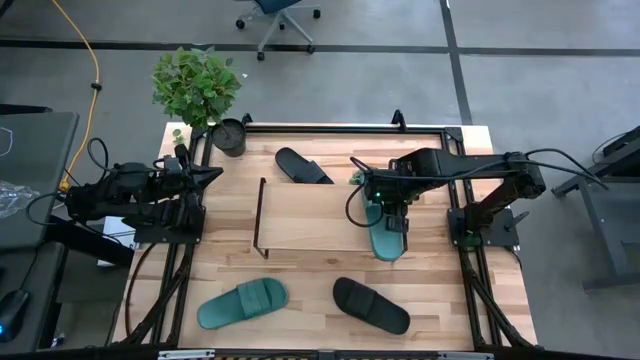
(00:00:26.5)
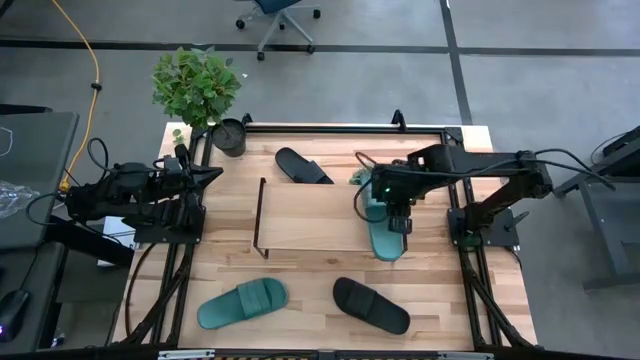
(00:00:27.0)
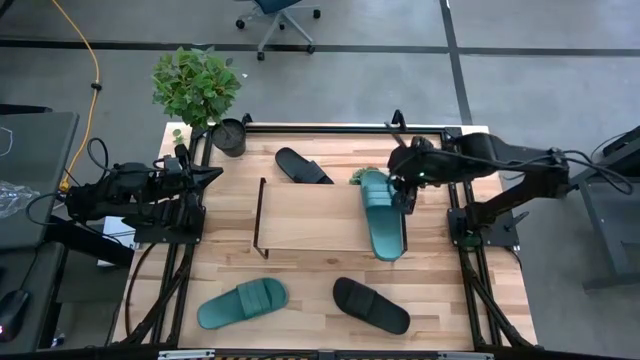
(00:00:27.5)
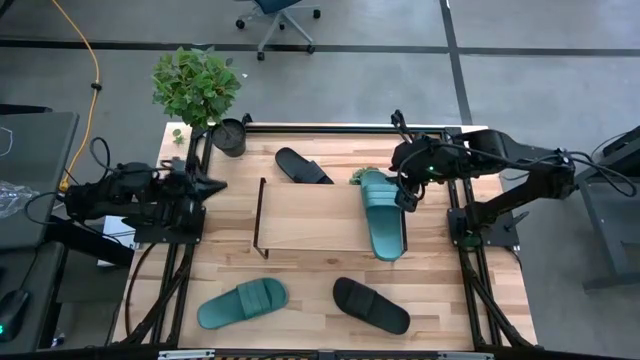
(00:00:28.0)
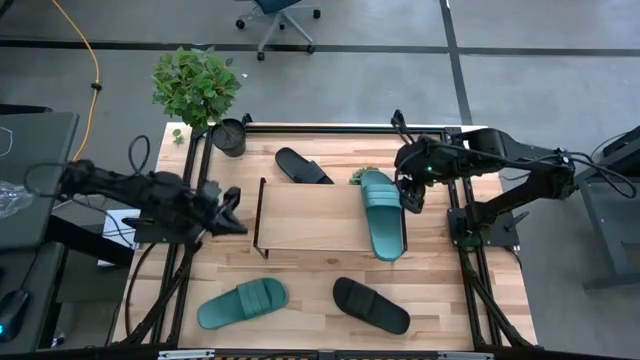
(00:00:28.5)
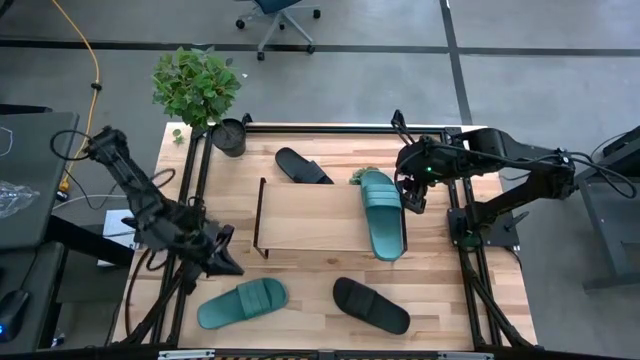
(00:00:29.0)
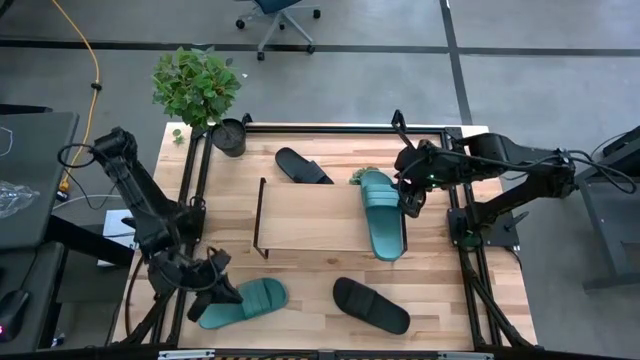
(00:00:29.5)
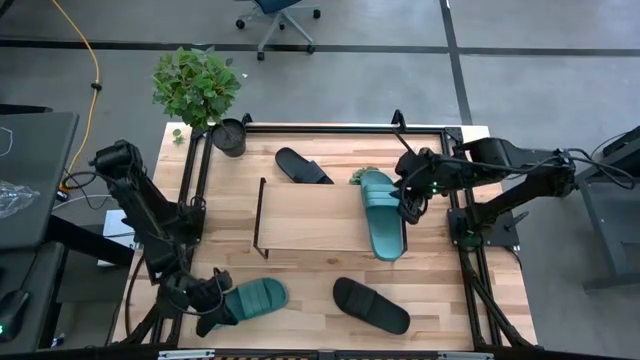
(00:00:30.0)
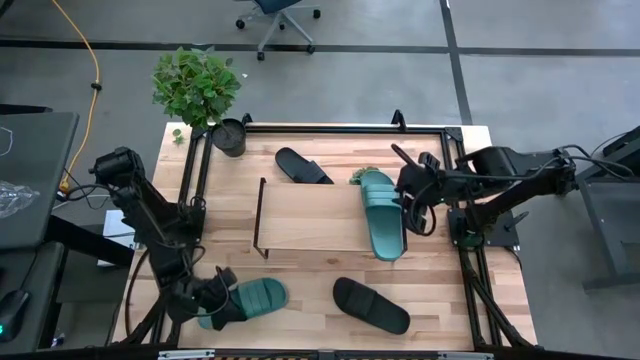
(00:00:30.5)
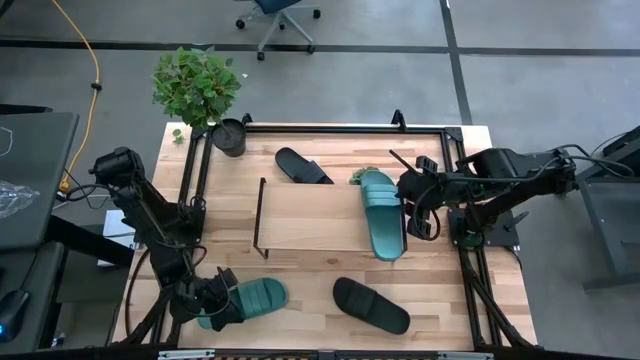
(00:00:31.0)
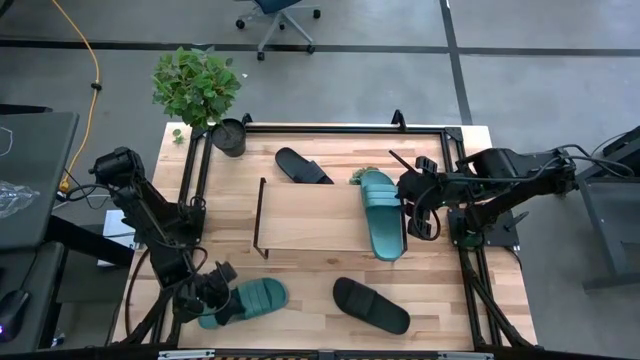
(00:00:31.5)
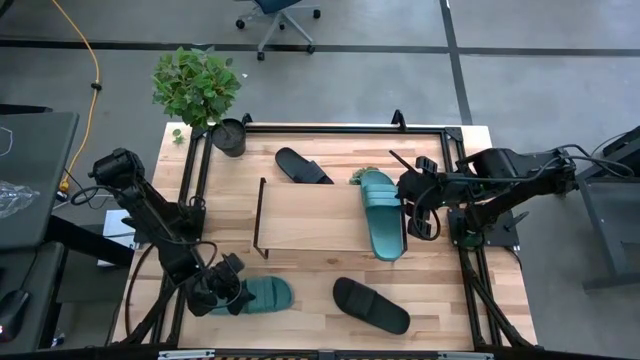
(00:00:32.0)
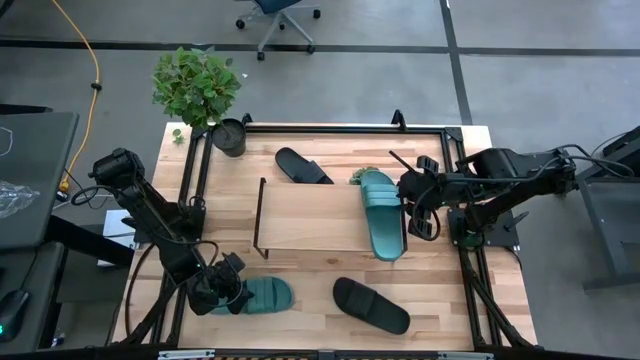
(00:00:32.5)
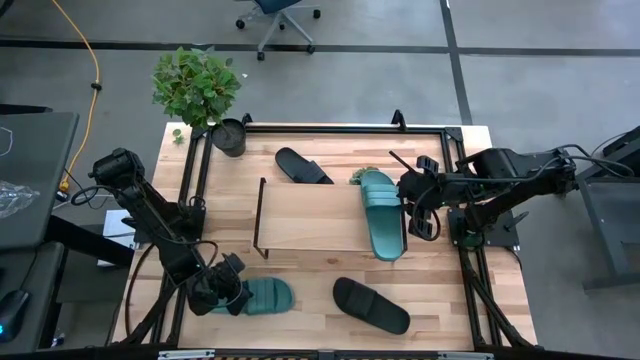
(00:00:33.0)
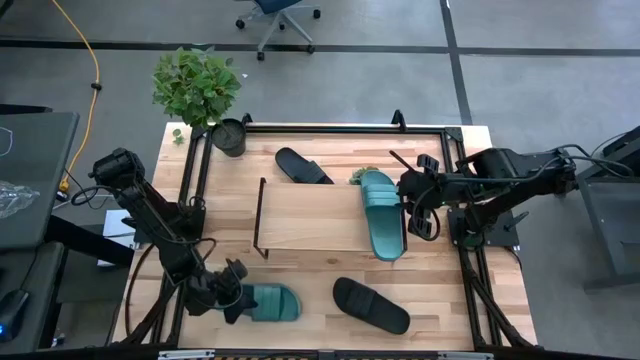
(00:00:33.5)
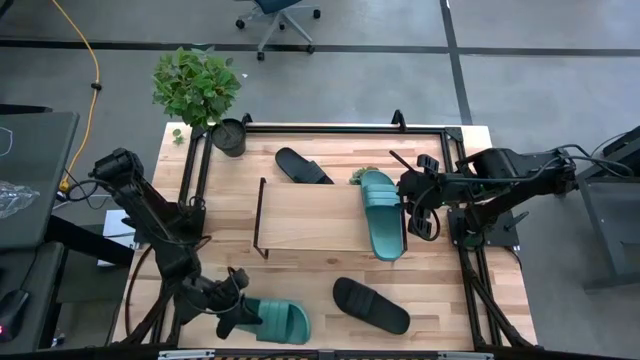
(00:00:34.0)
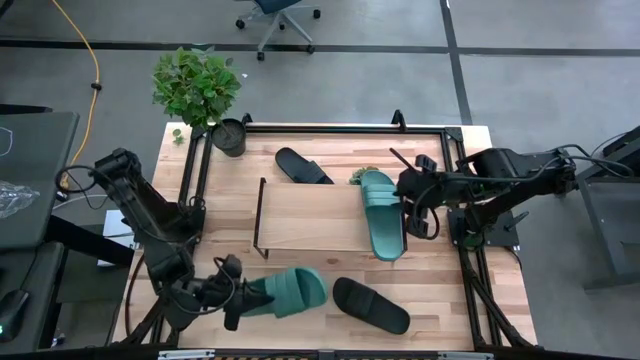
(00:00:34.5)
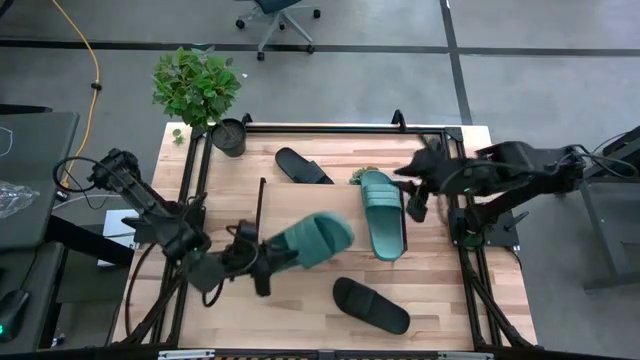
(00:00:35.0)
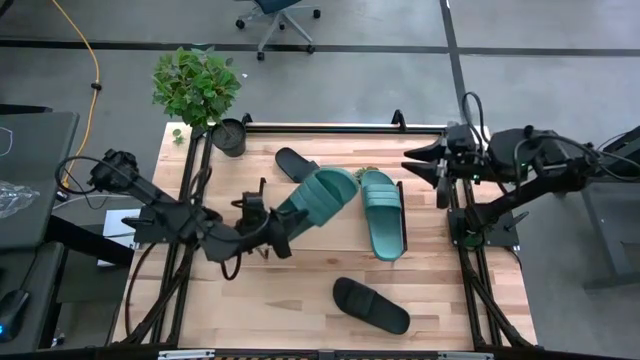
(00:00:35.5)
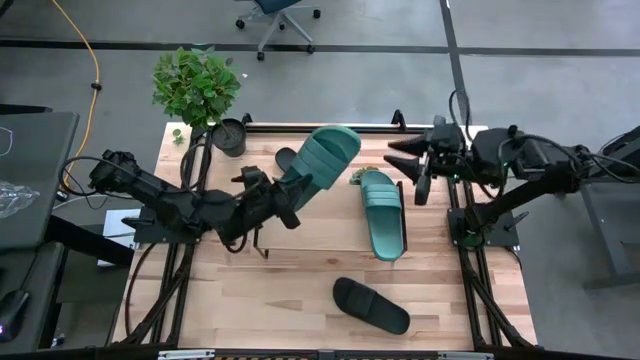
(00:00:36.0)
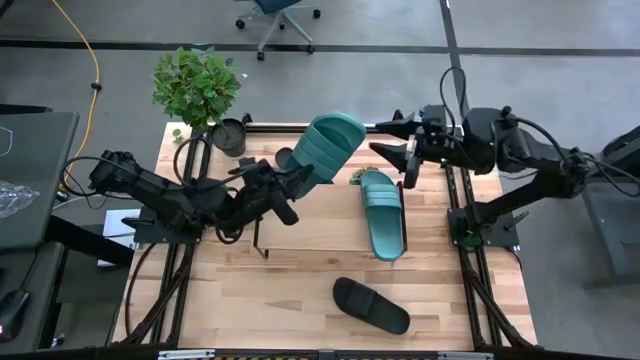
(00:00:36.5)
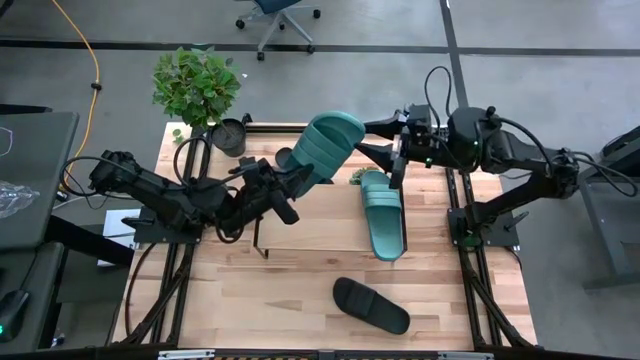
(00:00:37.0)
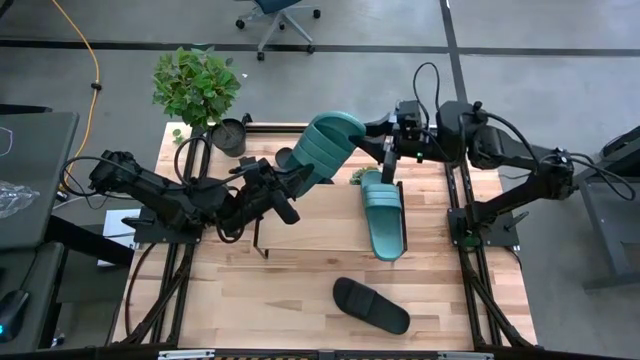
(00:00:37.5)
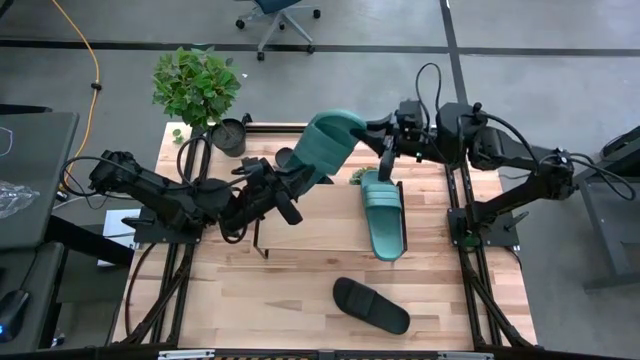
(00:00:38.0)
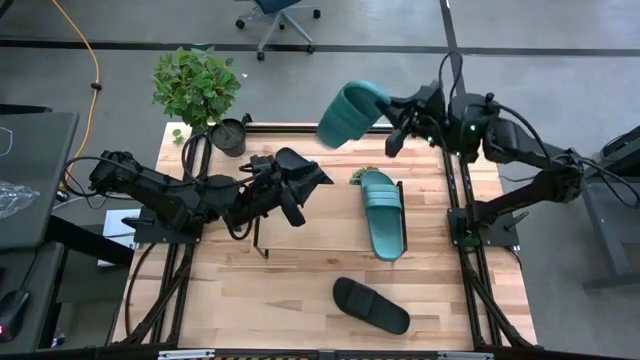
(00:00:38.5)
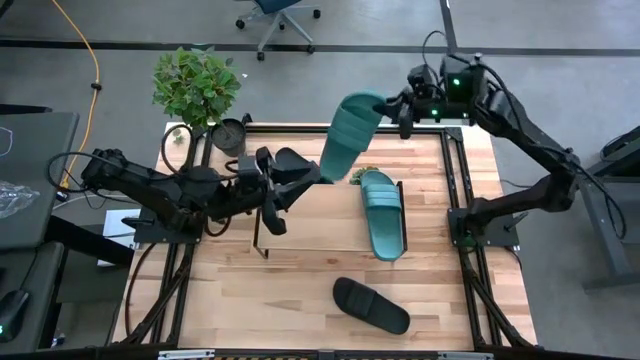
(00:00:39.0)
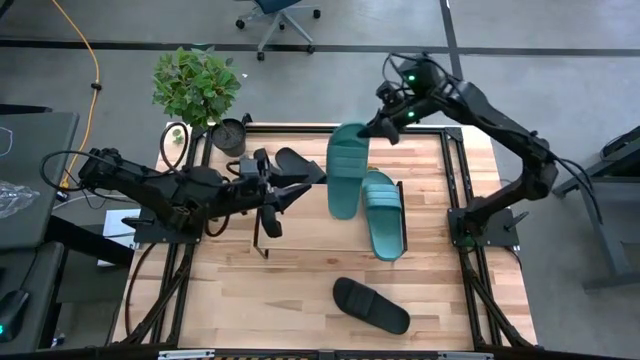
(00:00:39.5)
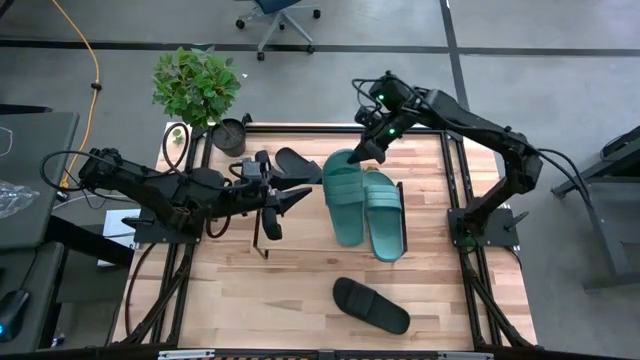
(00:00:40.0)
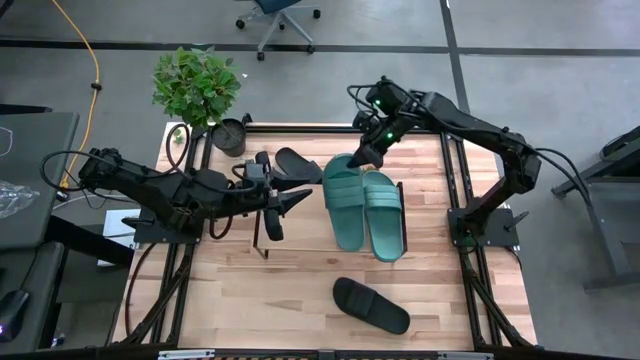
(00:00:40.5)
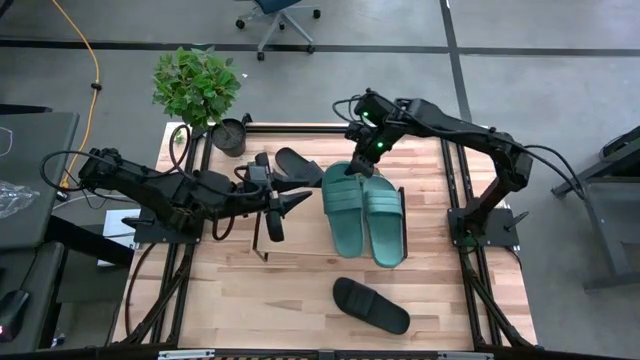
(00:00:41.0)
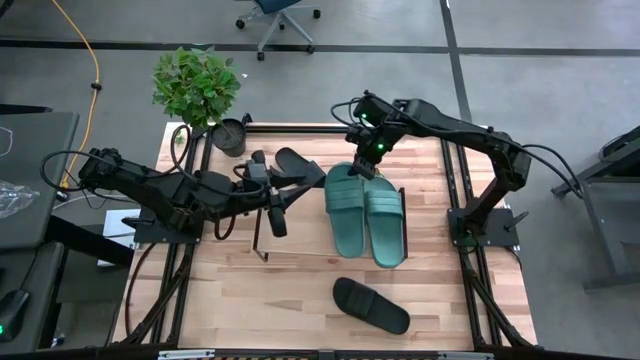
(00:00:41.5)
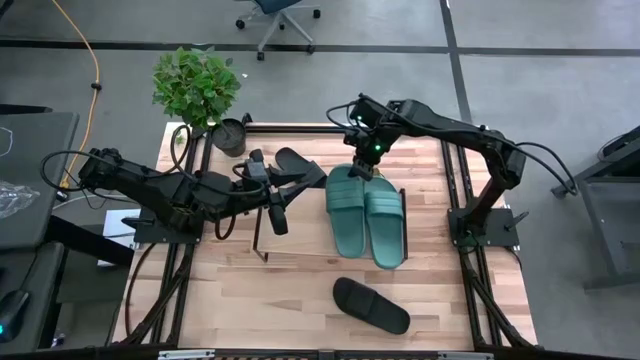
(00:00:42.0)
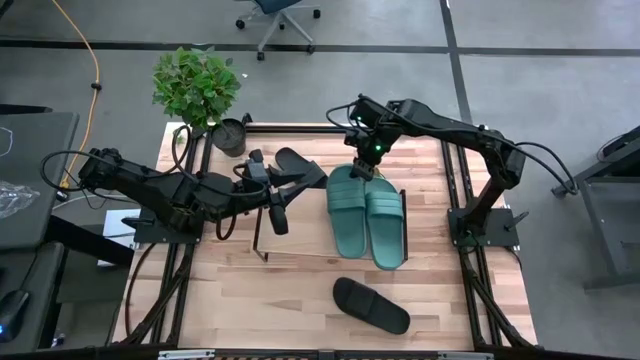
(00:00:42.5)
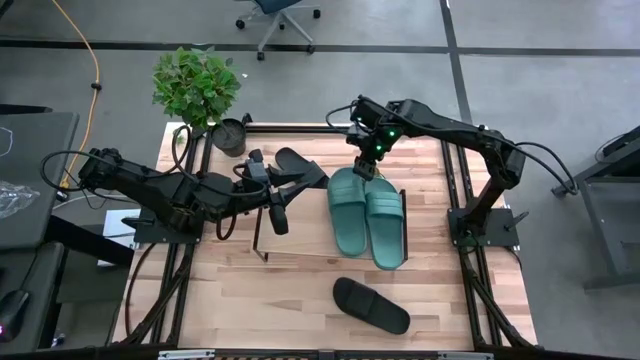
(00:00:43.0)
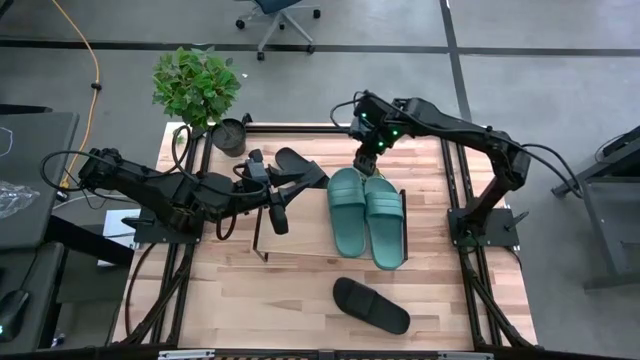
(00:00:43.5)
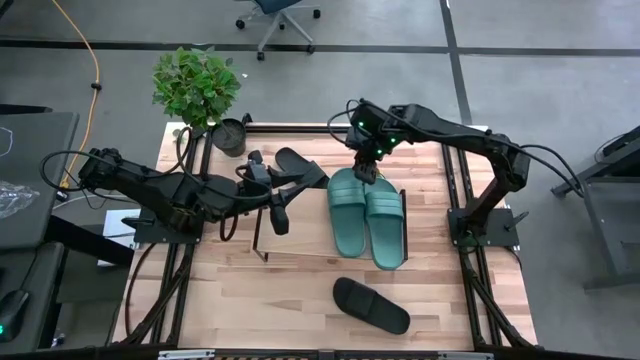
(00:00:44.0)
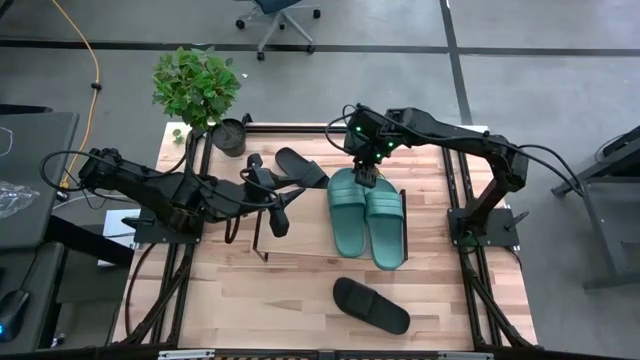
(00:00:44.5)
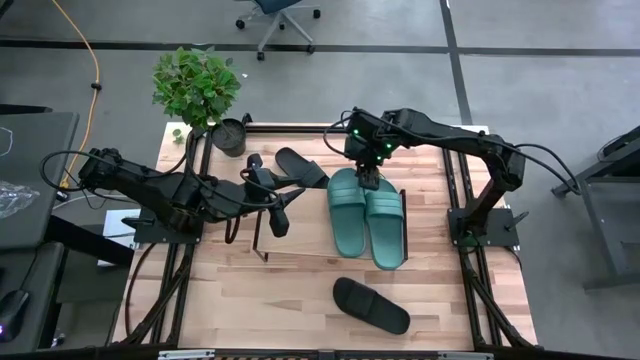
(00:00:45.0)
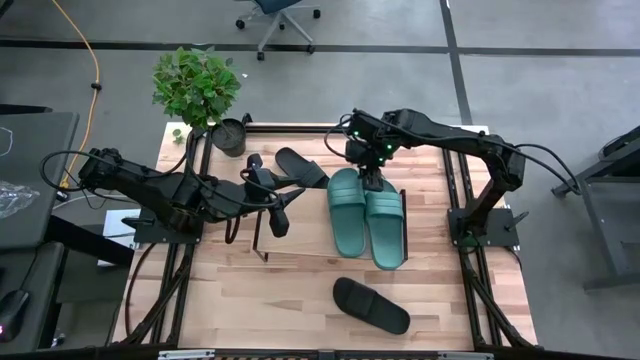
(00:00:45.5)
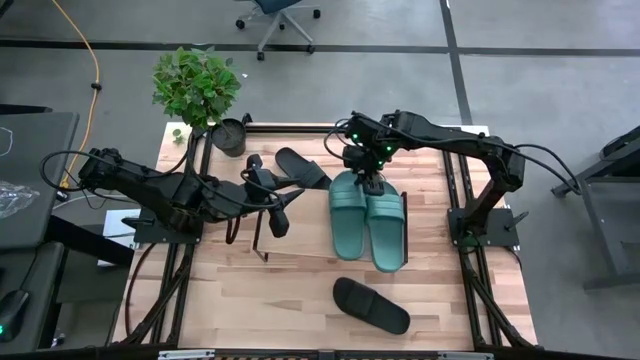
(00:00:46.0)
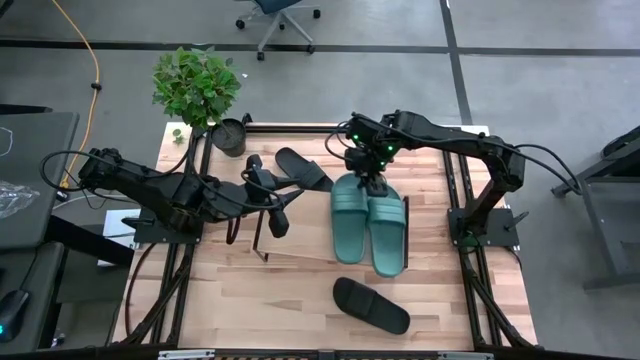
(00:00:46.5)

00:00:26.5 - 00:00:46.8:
Task: Pick and place slides into the shelf
Put the green slipper on the shelf
